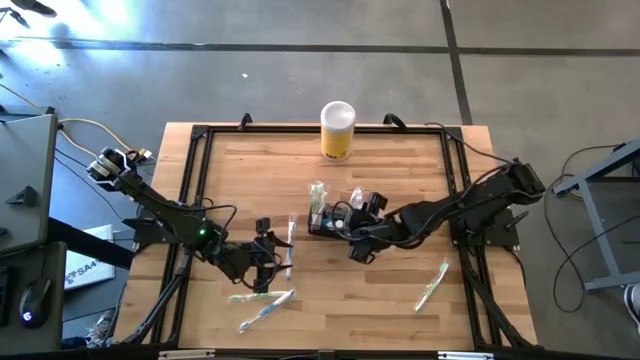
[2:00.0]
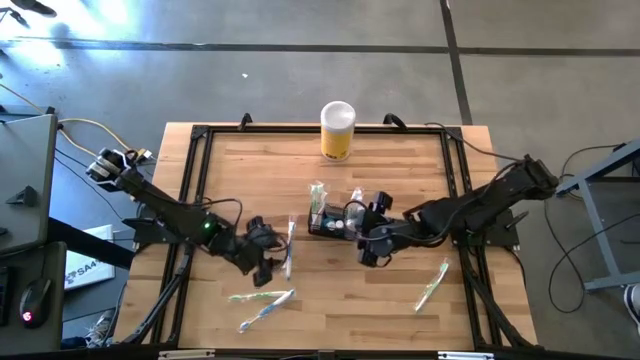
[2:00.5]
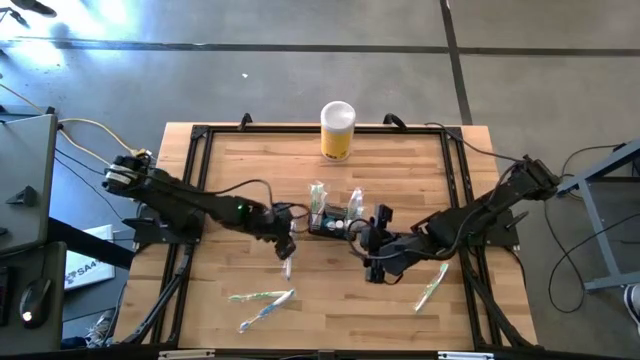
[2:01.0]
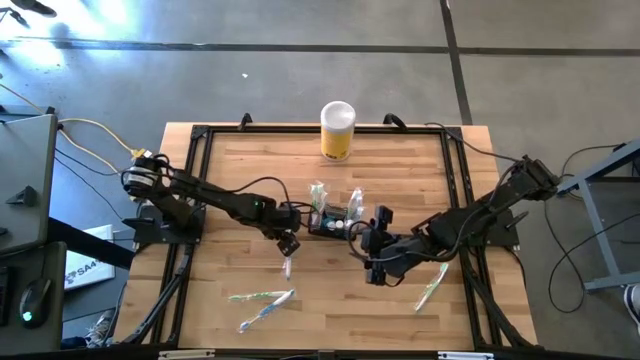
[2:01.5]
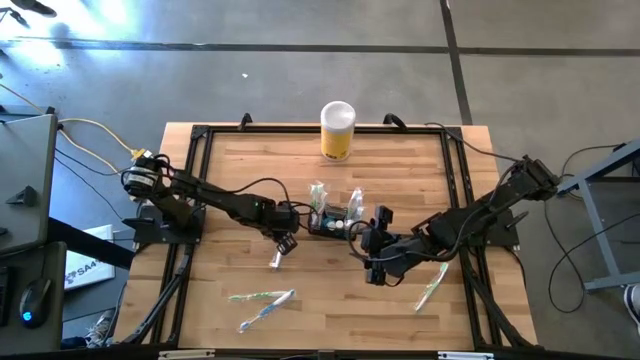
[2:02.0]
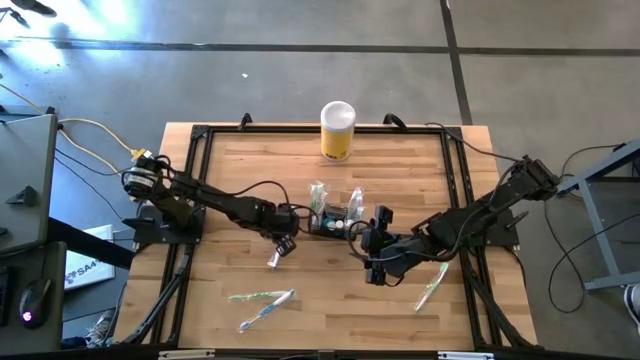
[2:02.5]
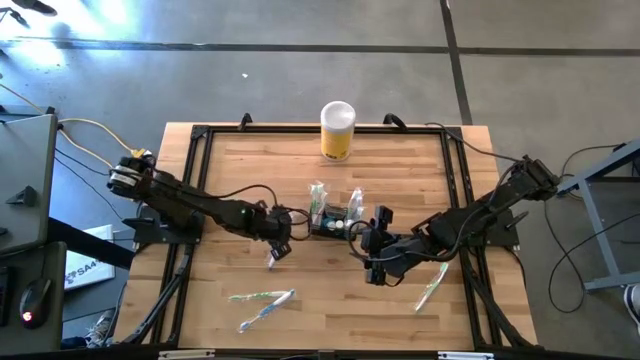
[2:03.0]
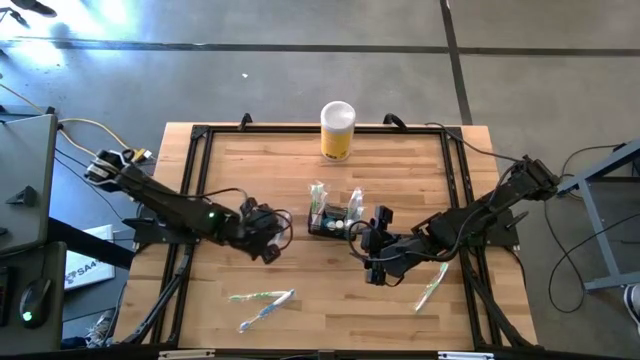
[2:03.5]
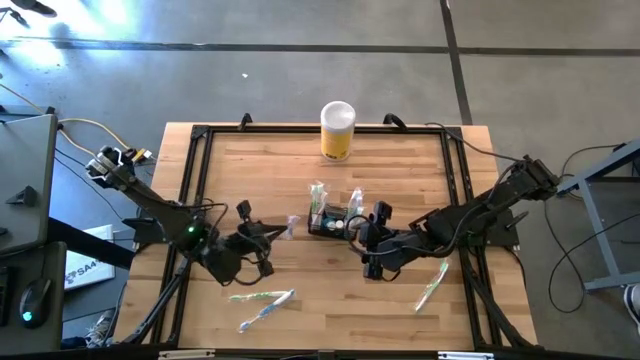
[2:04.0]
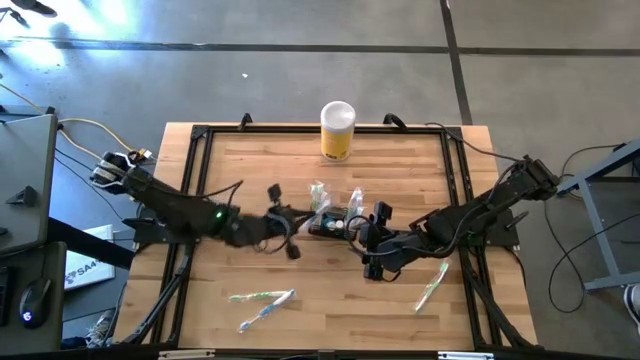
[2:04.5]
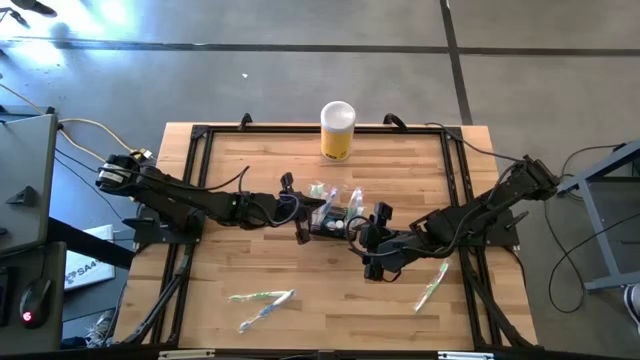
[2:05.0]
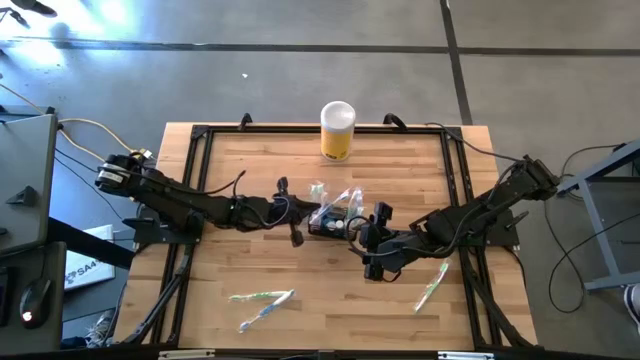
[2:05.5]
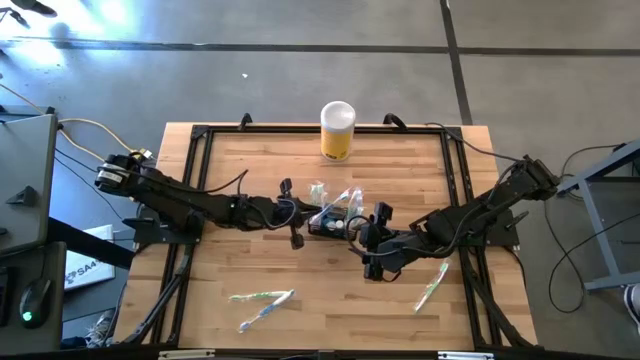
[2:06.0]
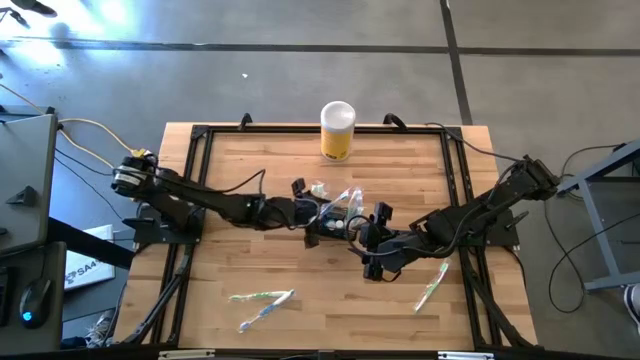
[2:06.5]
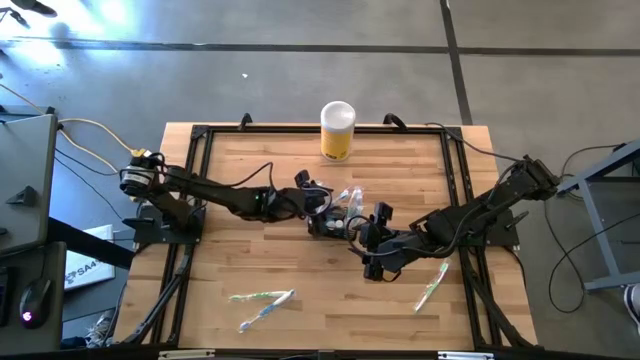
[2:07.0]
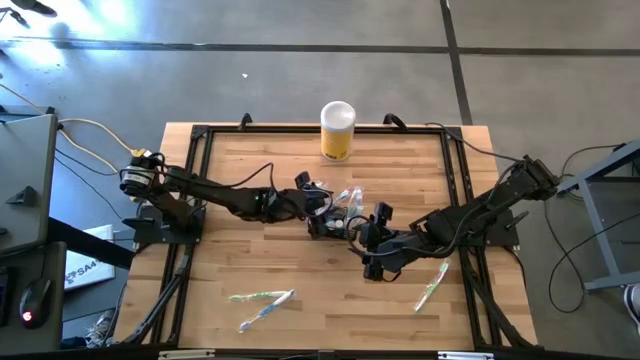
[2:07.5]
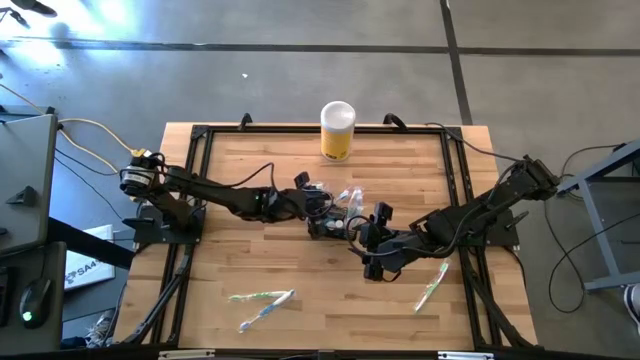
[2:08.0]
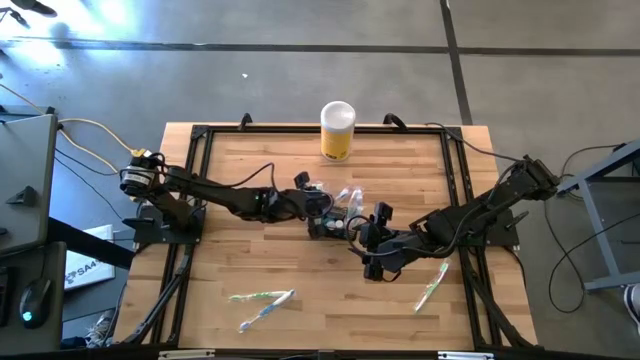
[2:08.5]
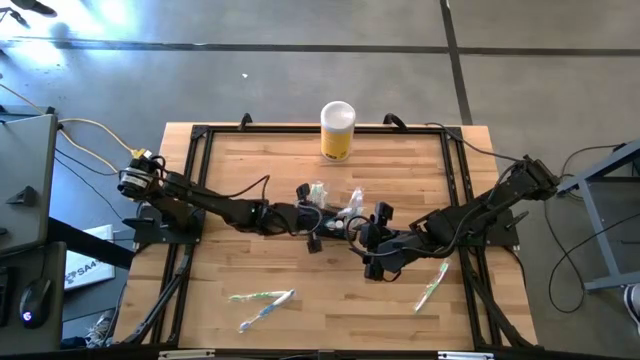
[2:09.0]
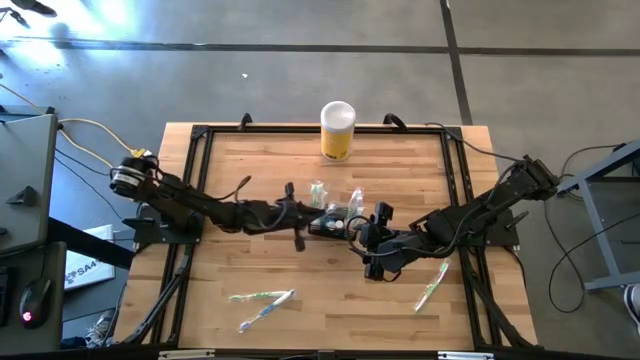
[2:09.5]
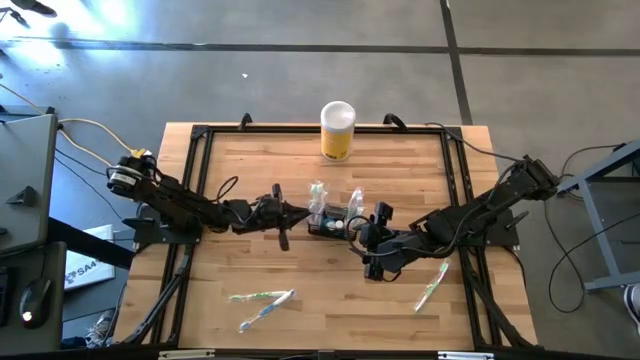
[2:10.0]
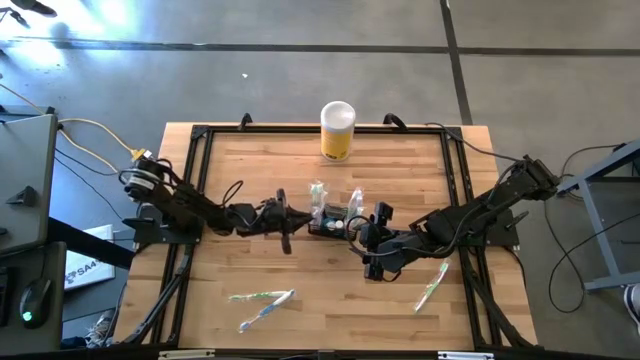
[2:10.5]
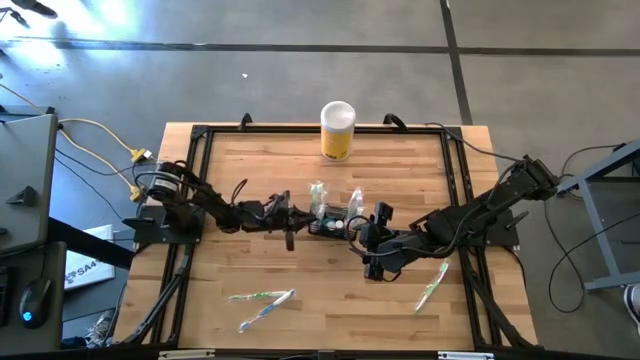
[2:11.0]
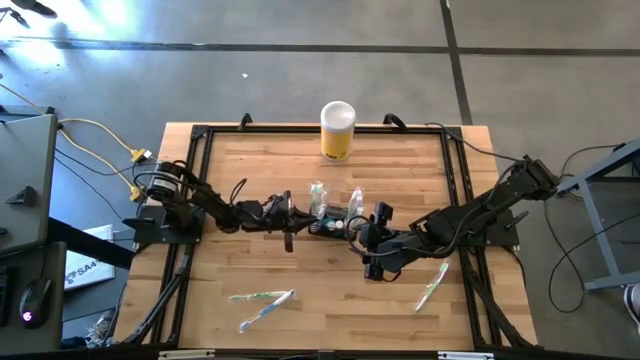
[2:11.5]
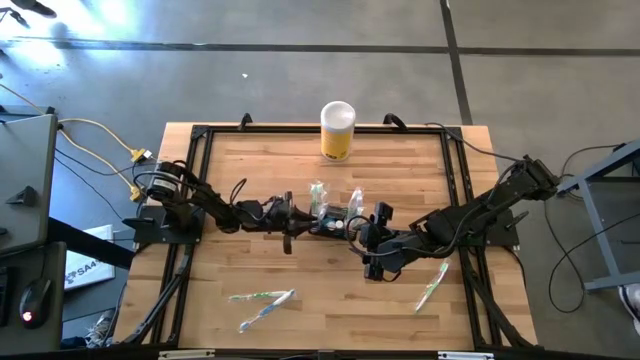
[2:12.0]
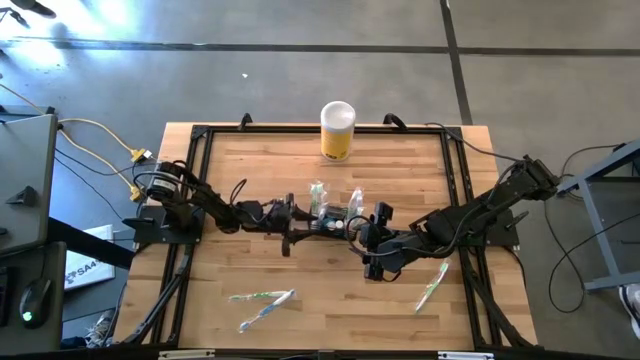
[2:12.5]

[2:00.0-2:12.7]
Task: Pick & Place toothbrushing station
Put the blue toothbrush into the wire organizer

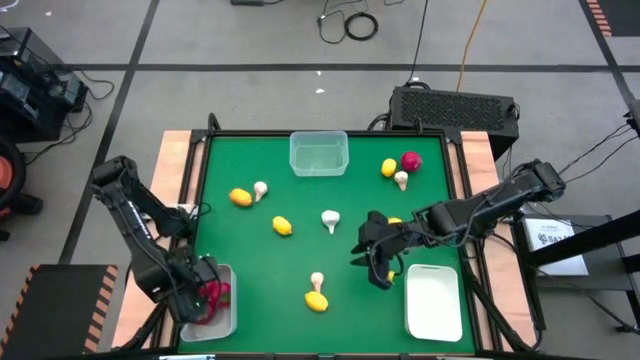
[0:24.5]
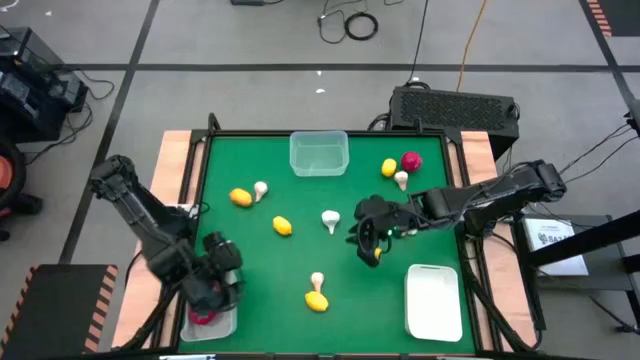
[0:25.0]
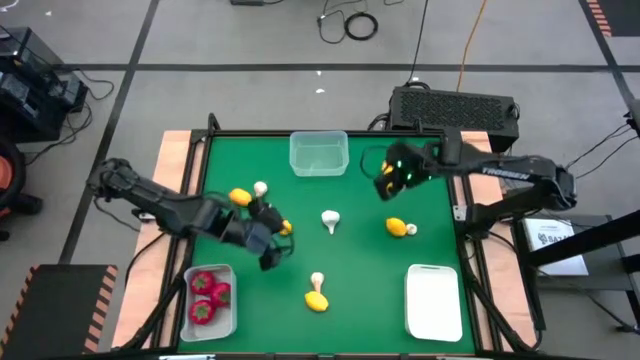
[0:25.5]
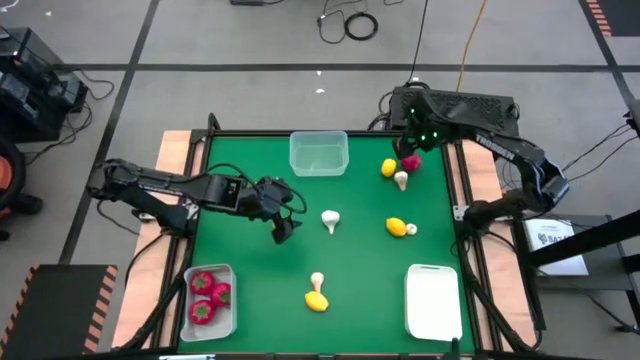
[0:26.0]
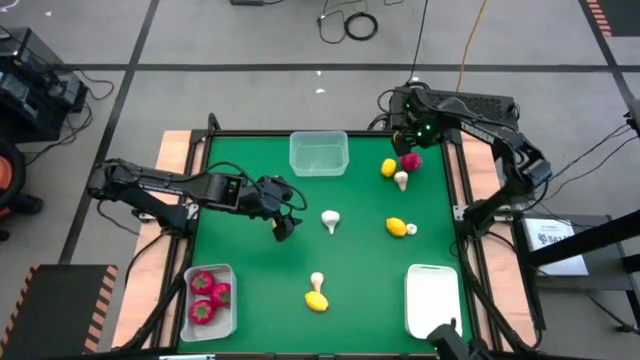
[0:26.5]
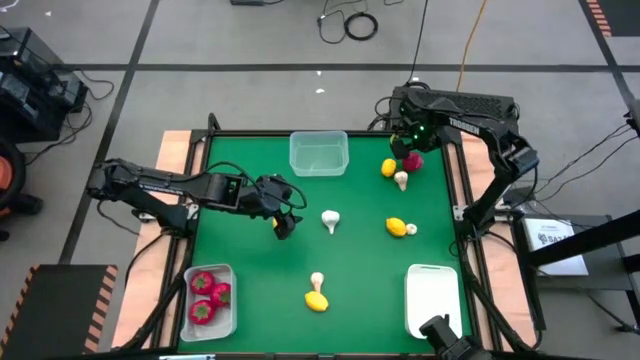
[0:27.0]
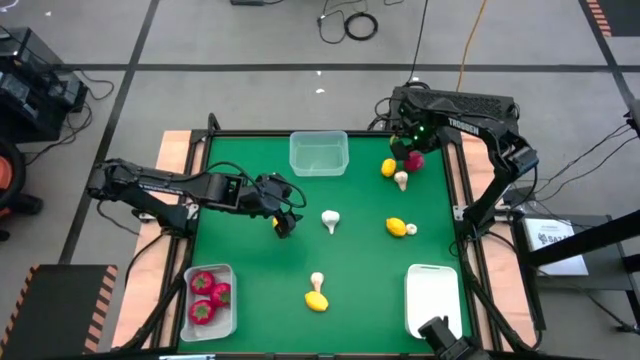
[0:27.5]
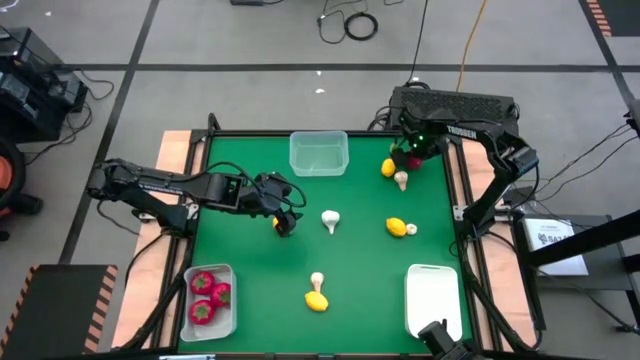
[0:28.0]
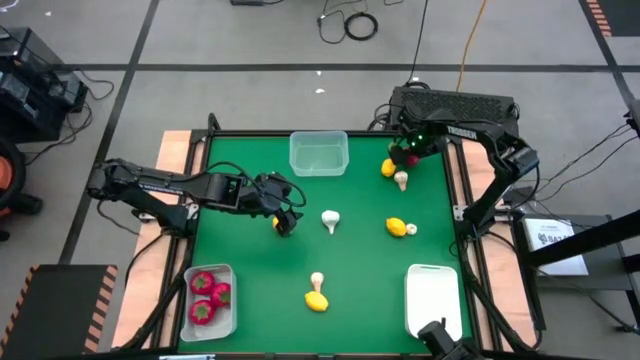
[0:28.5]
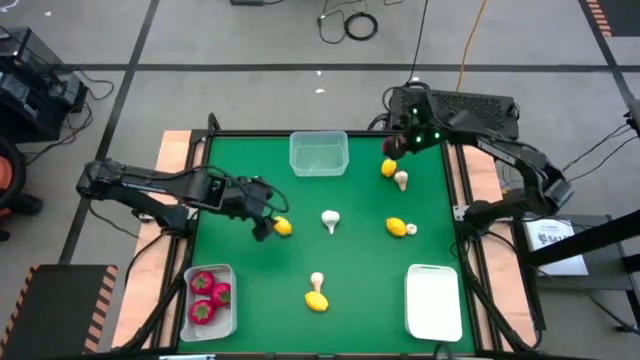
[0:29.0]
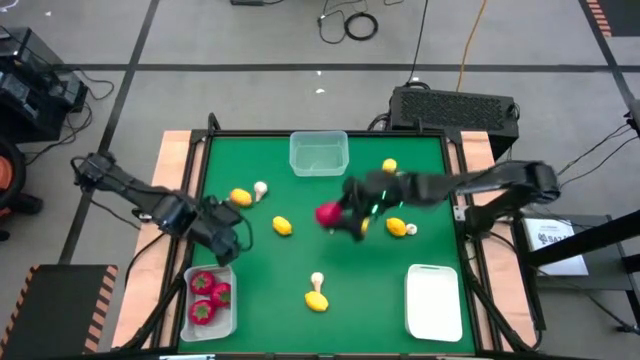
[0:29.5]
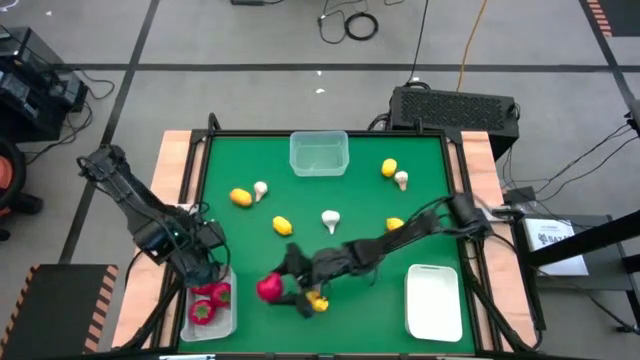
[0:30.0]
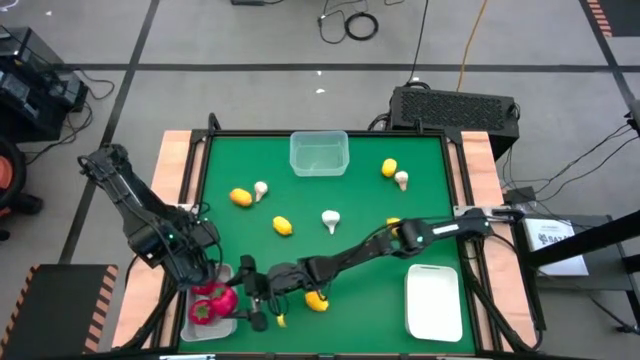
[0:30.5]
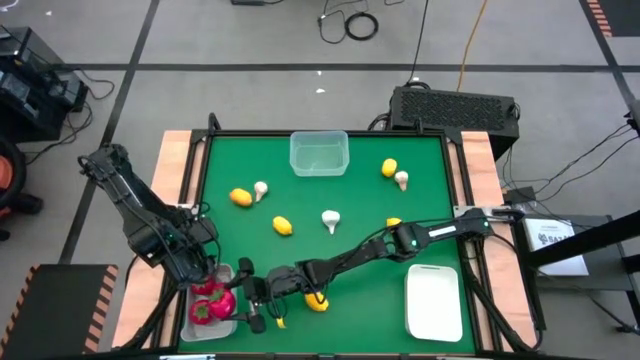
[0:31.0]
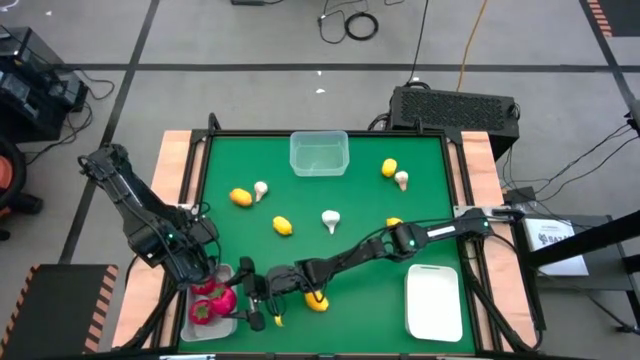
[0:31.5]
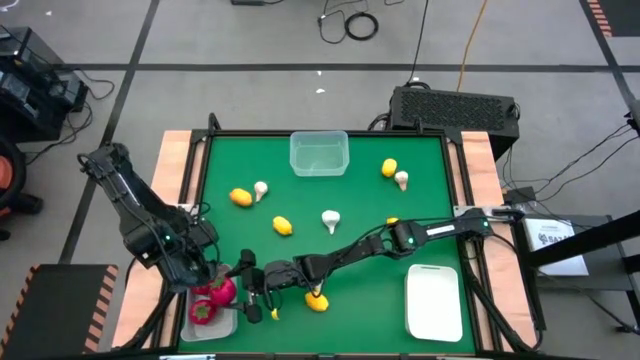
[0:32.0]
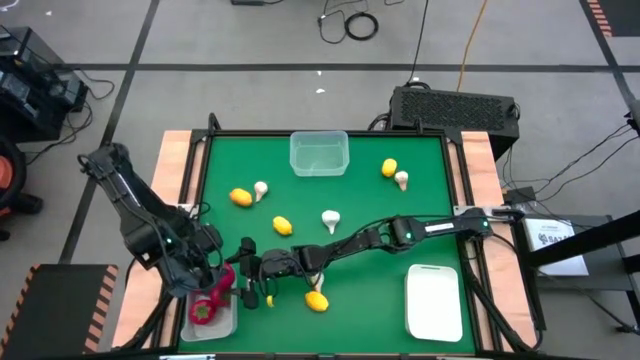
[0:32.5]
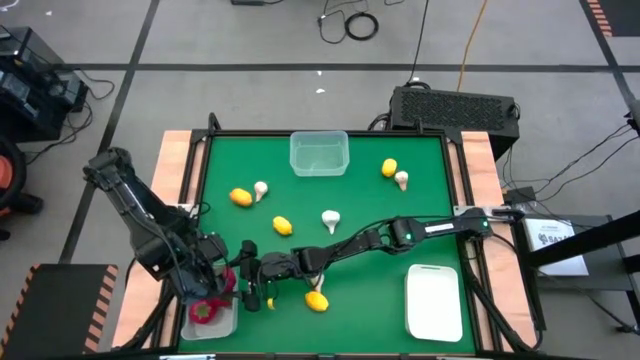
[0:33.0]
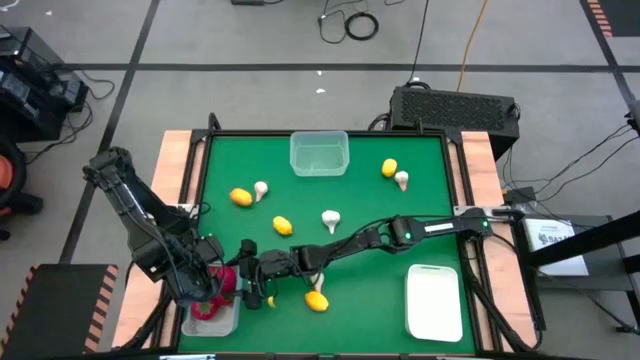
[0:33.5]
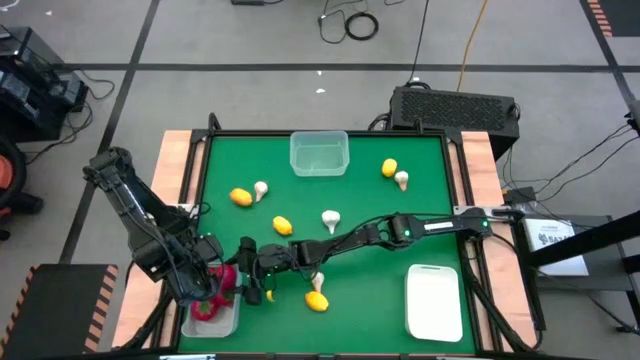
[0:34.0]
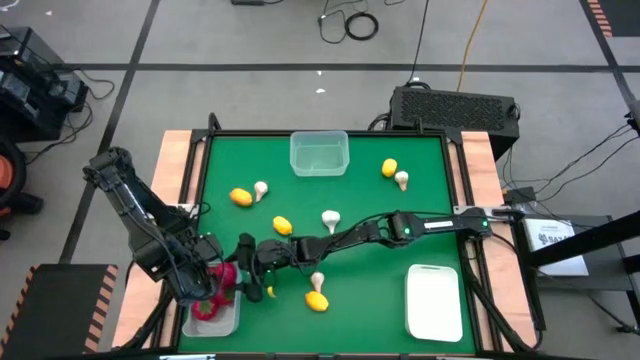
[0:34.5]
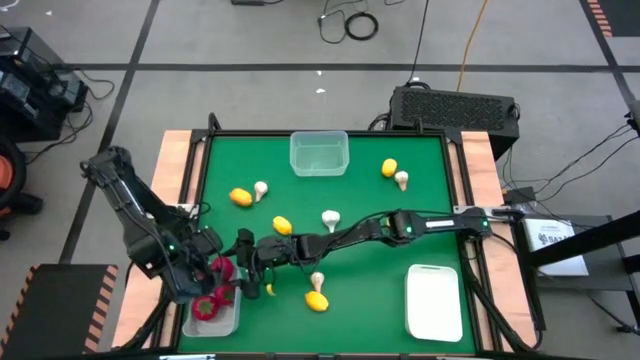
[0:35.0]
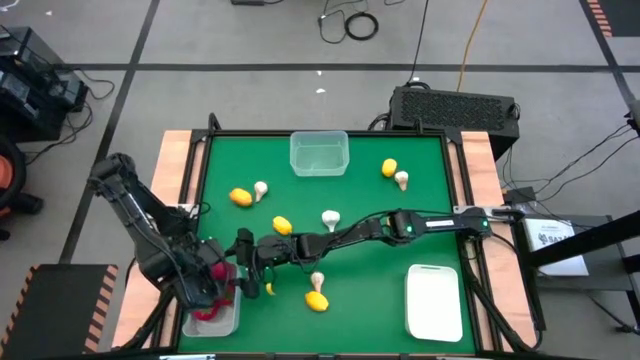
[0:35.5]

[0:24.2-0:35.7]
Task: Sort produce into baskets
Put the tomato into the gray bin
